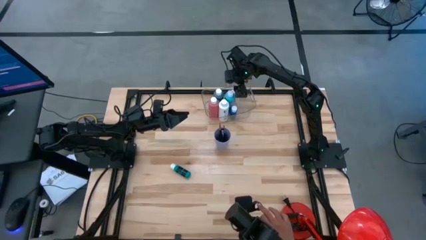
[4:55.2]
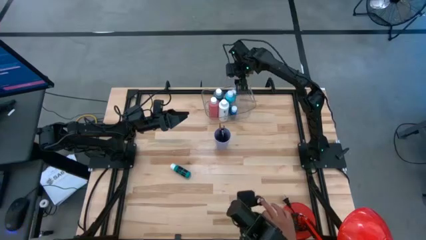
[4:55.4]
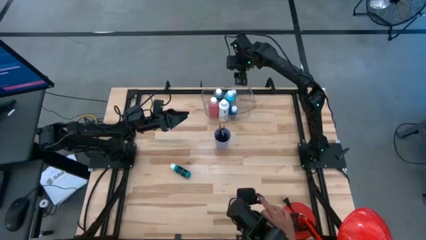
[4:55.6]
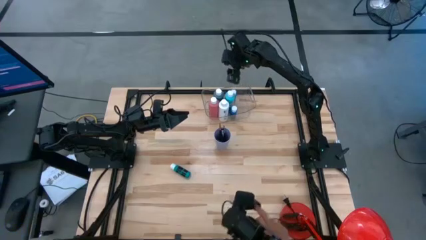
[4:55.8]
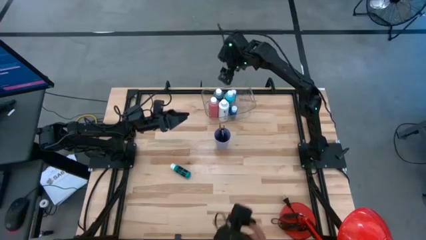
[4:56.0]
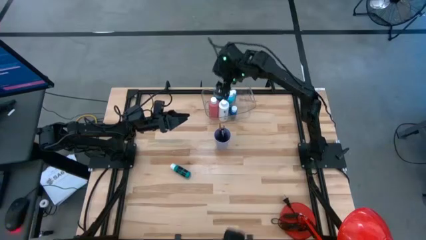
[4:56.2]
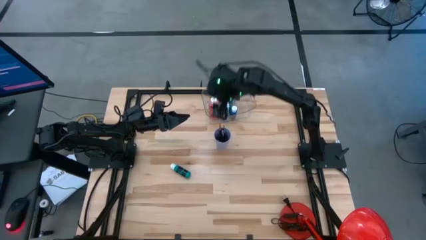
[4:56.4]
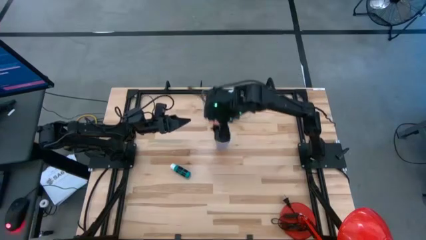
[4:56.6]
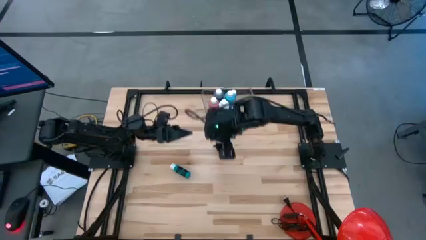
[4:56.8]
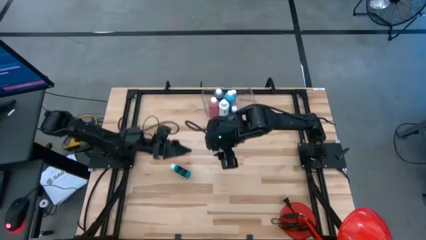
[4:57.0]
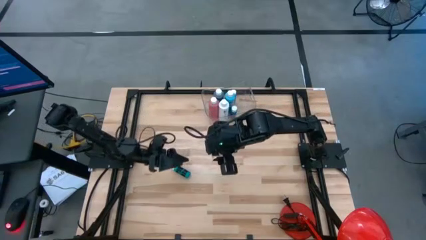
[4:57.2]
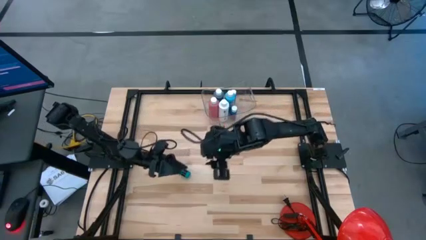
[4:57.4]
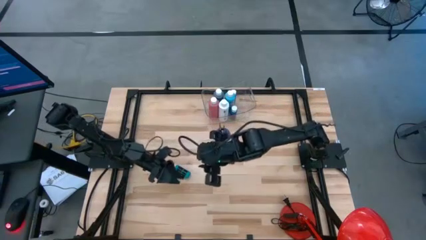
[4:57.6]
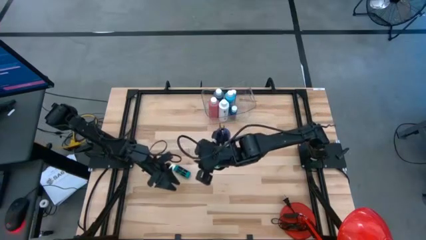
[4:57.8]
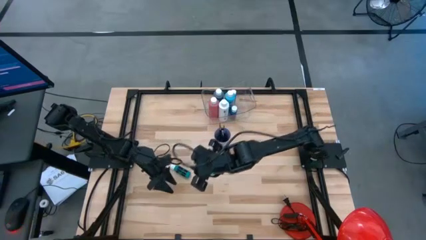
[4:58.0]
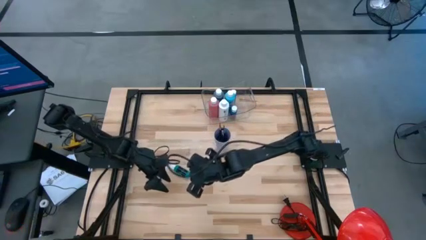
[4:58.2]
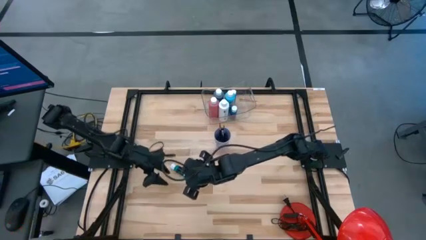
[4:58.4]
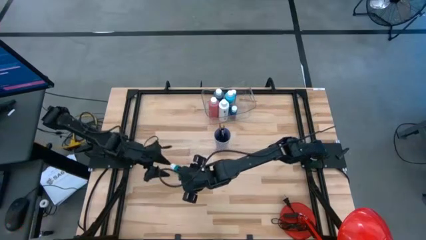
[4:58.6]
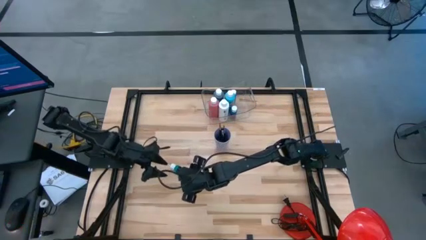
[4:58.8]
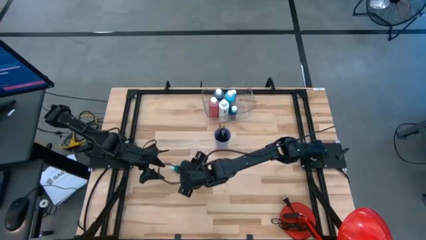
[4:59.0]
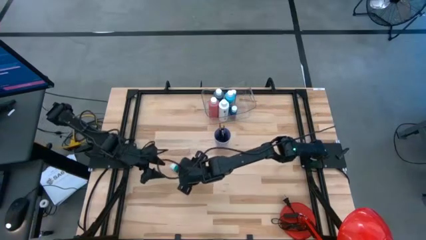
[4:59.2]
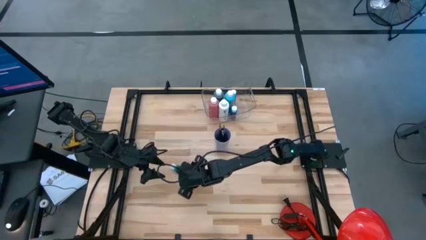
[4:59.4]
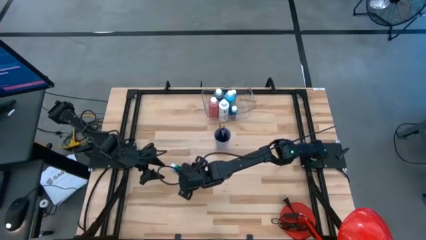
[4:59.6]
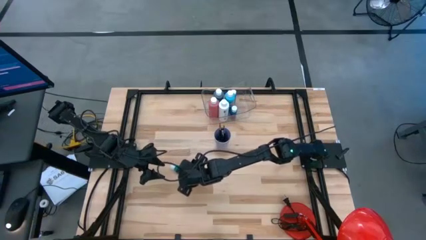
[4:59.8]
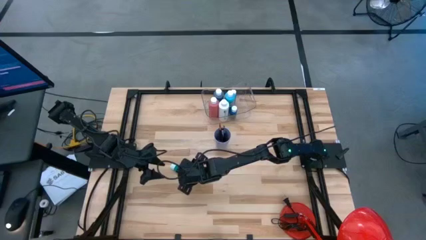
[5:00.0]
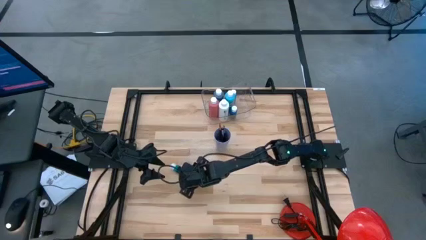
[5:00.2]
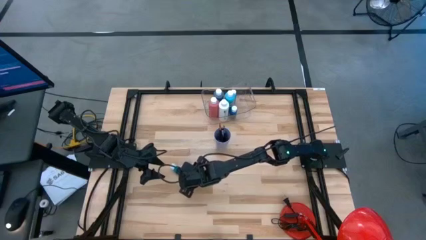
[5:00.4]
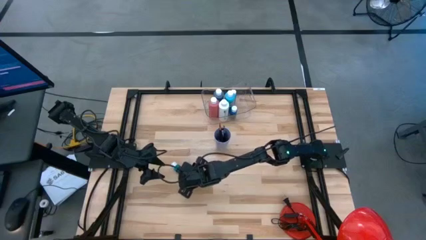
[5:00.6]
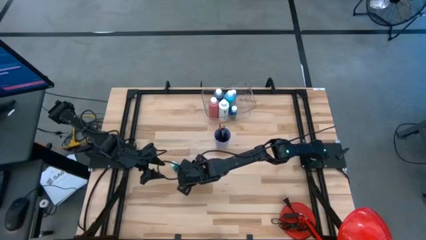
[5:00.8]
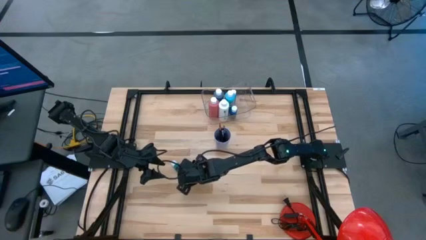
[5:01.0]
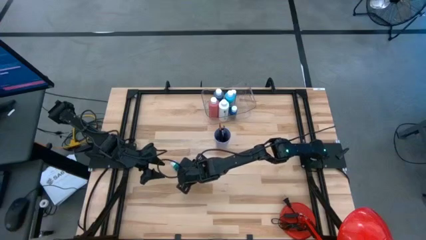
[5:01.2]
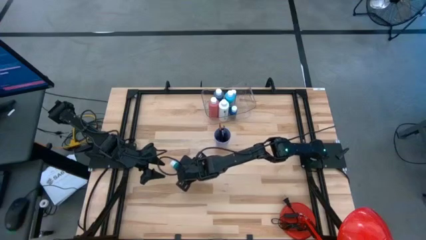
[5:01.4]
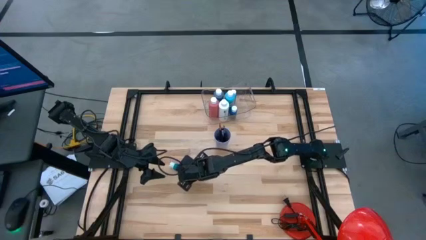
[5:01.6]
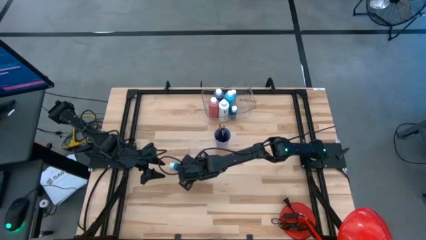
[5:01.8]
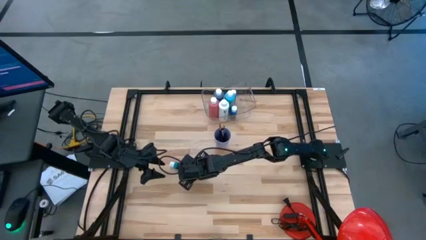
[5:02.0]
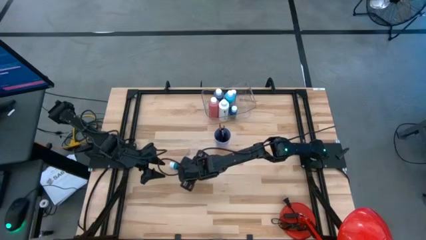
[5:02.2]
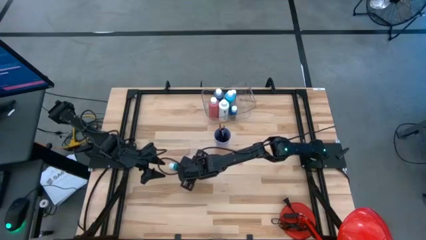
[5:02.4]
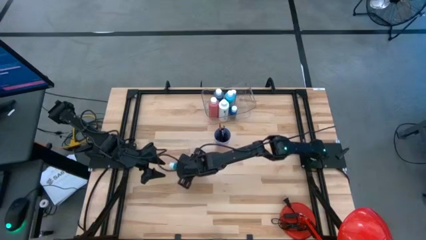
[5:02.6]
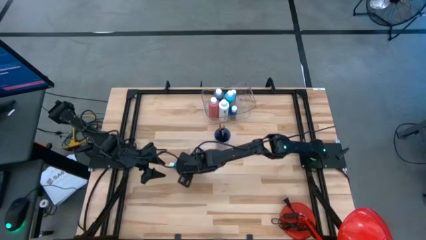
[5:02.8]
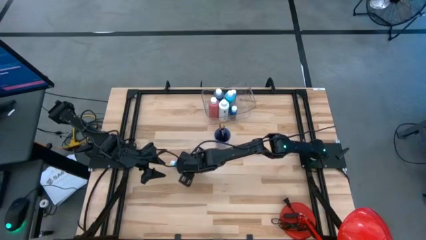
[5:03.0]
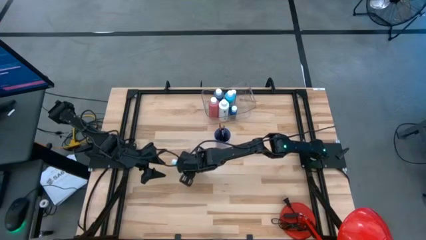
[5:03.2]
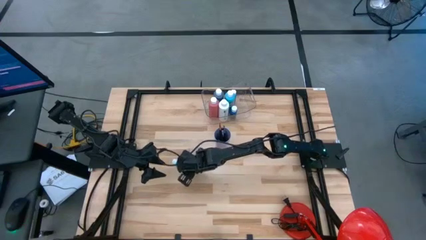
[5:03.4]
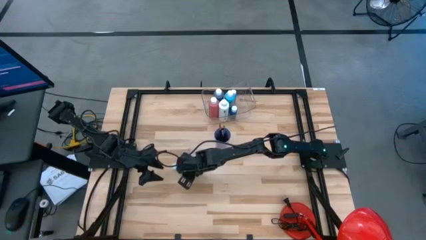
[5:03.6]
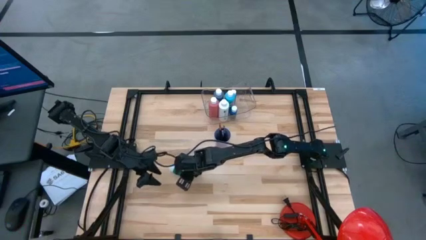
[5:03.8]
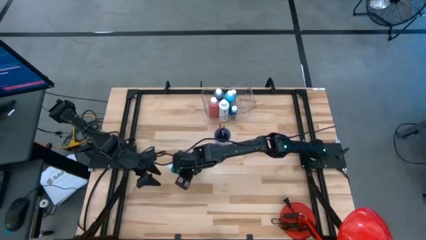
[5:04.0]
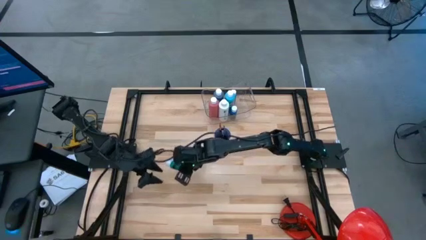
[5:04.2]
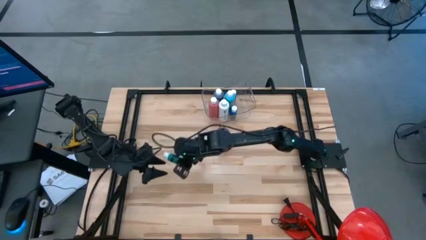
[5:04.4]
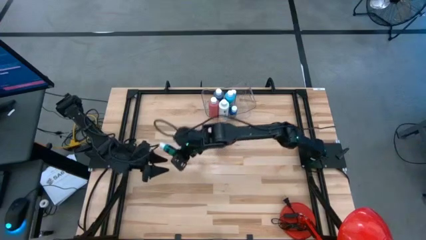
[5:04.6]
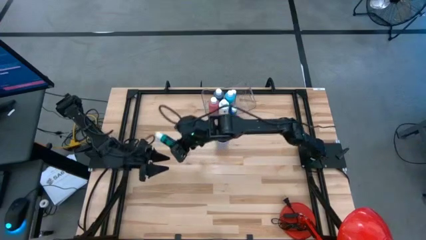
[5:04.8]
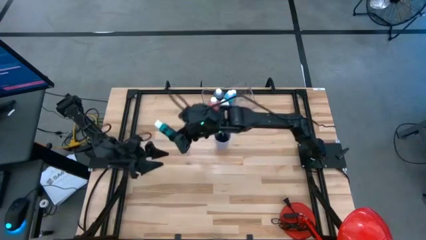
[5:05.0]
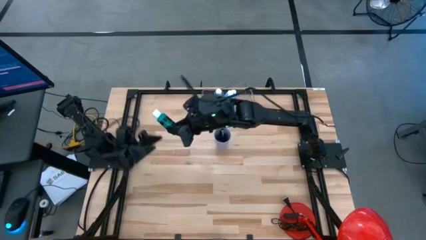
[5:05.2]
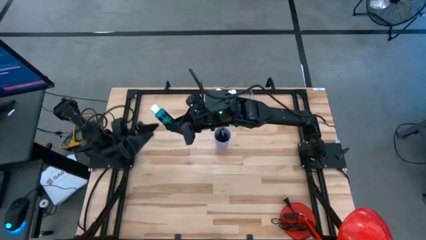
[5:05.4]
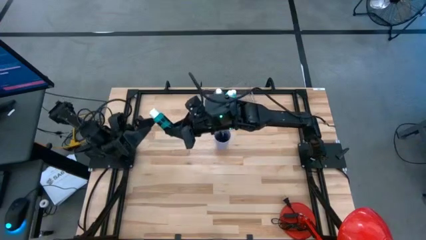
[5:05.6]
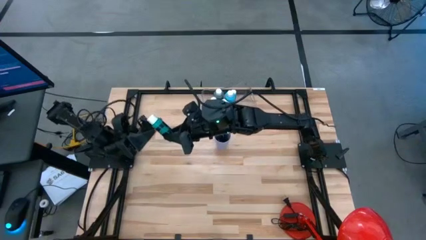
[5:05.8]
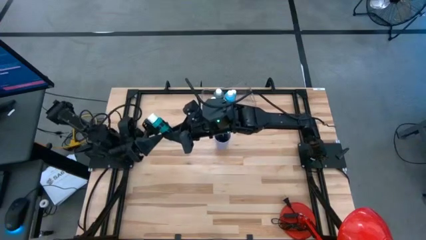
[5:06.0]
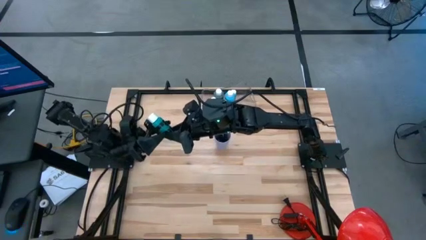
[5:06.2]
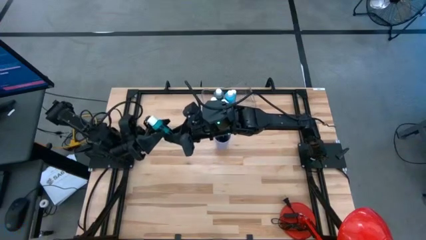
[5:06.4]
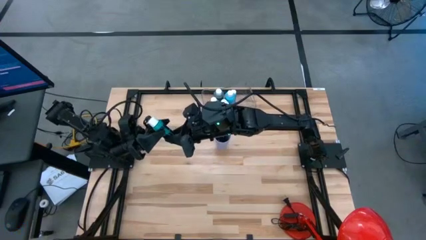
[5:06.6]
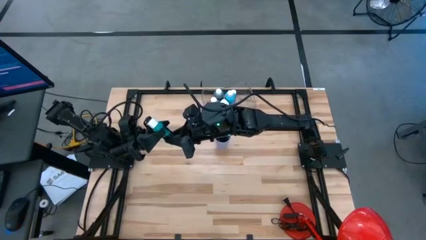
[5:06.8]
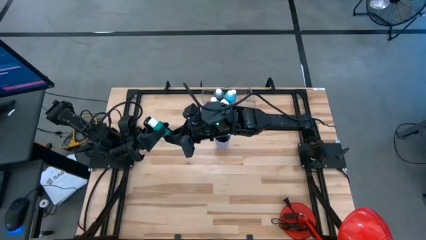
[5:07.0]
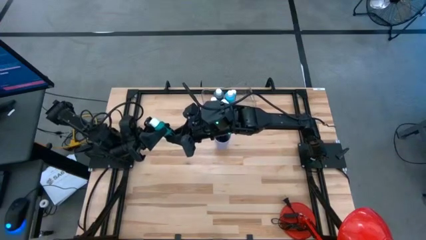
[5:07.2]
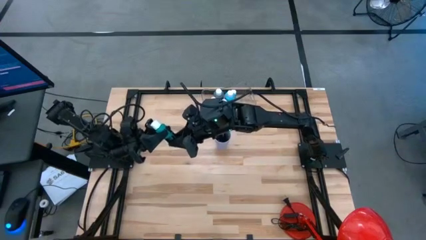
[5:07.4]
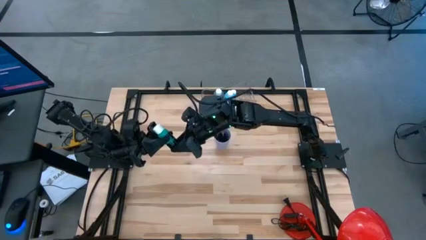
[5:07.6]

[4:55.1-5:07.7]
Task: Pick & Place Paint Supplies
Put the green paint bottle into the transparent bin

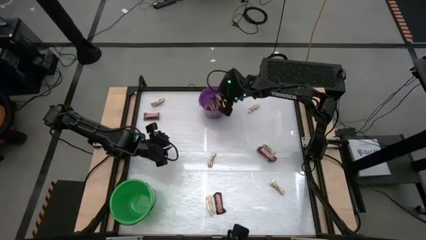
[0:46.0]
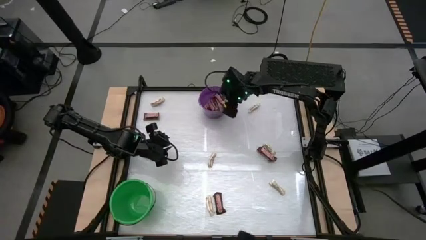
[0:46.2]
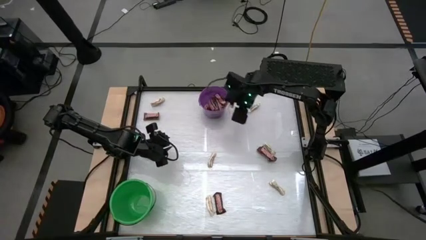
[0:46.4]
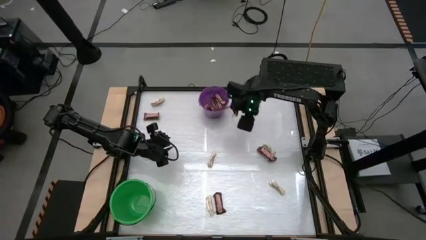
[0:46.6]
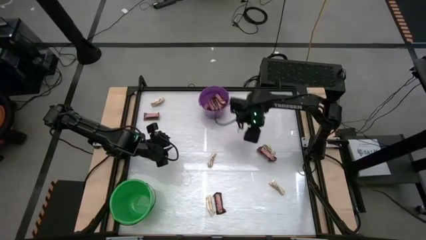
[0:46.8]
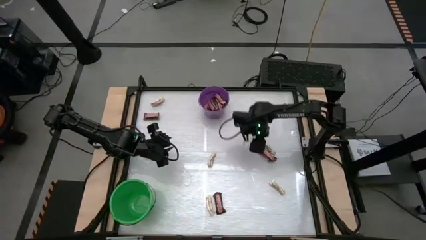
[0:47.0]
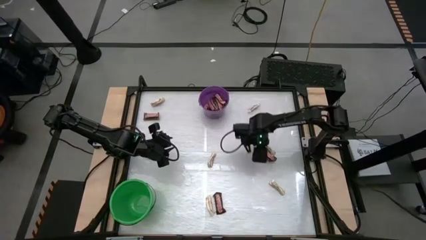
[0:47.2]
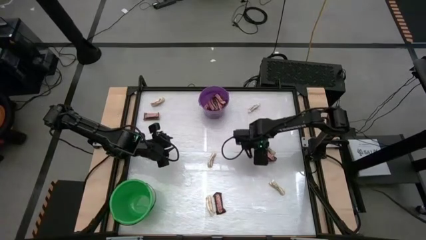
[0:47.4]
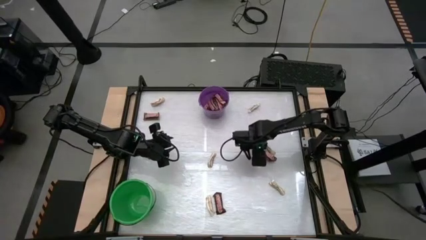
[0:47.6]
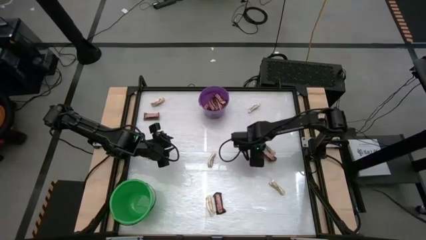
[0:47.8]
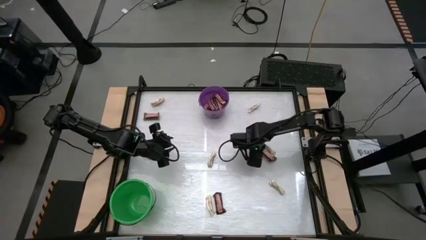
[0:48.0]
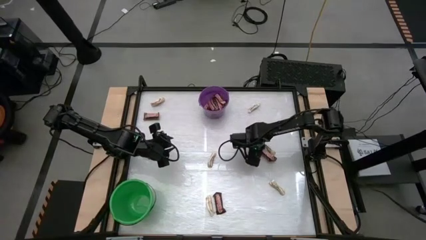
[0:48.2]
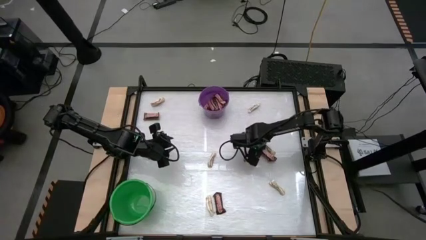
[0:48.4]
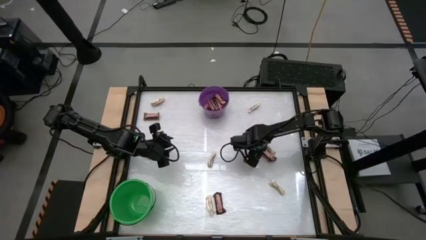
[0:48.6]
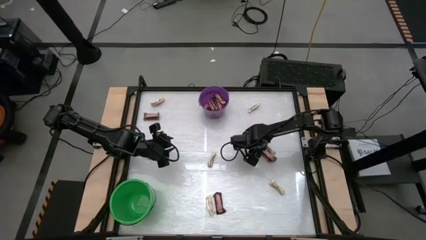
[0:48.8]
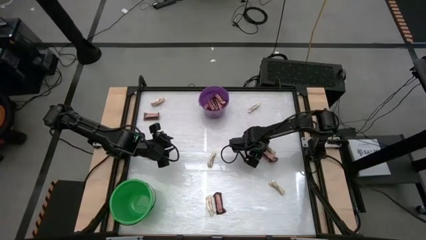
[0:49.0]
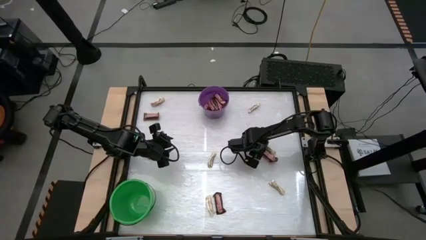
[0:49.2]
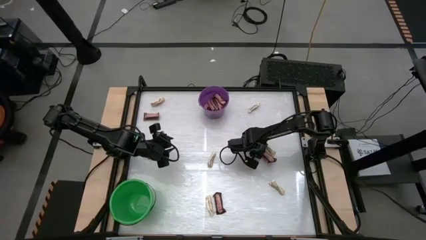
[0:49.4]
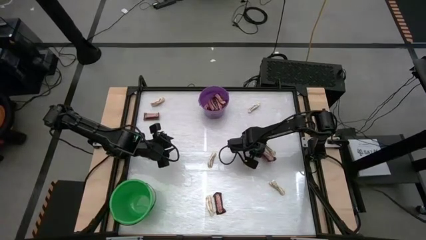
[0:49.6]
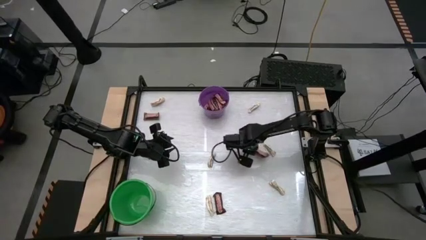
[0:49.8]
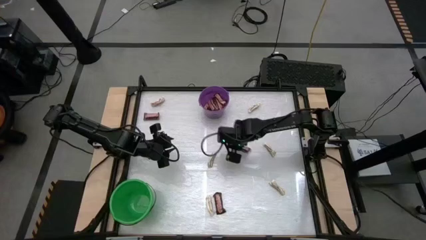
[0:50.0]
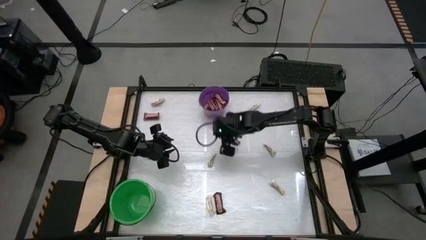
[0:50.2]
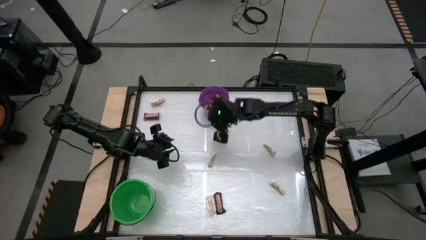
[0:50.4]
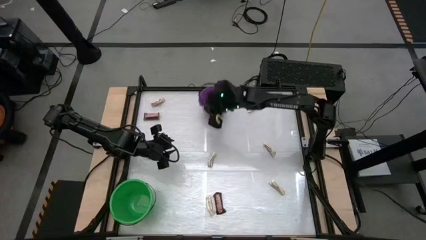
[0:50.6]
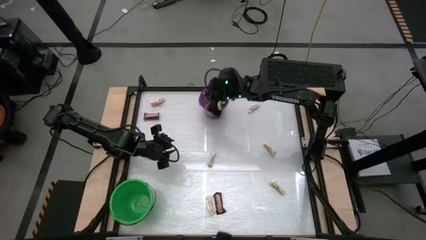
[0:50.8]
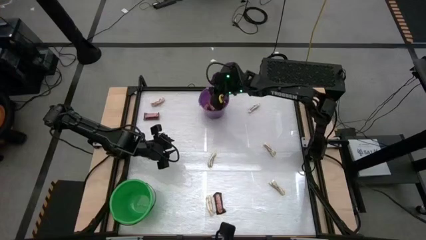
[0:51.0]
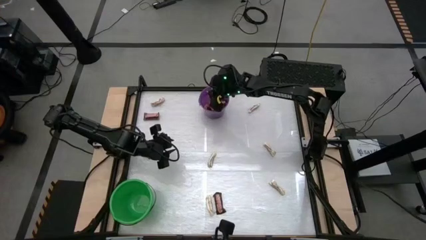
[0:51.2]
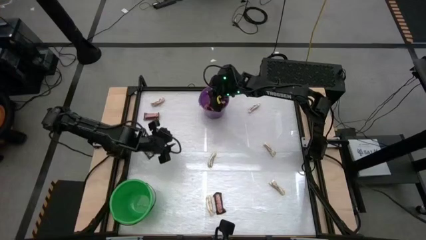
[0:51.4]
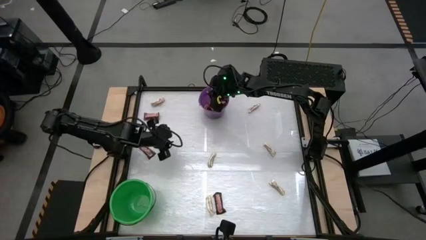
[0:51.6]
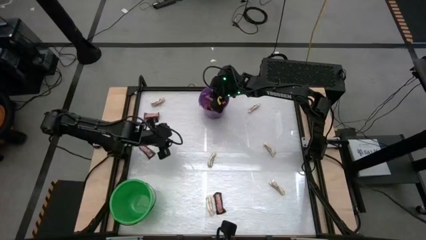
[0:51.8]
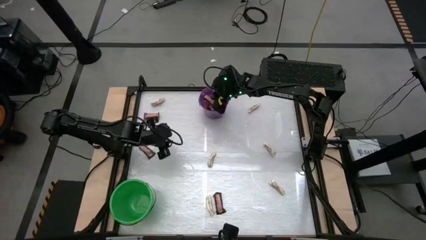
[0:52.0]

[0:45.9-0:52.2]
Task: Sort candy by brand, put in halloween buckets
Put the brown chocolate into the purple bucket
